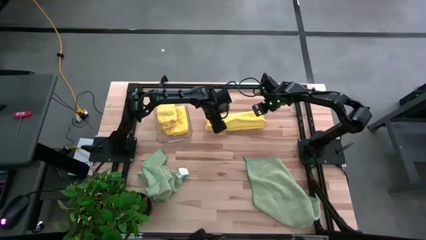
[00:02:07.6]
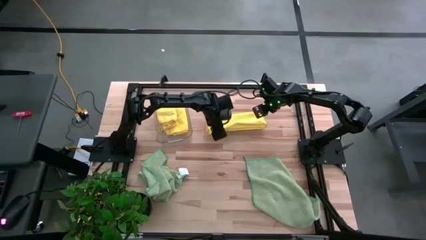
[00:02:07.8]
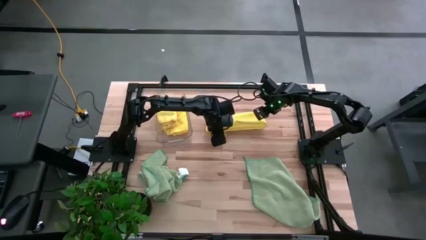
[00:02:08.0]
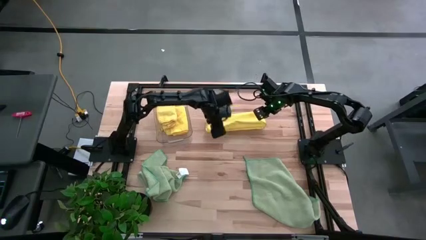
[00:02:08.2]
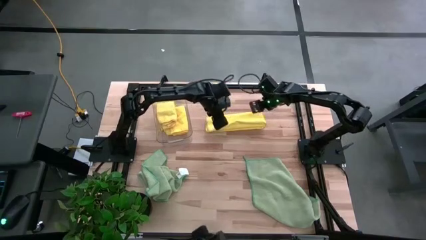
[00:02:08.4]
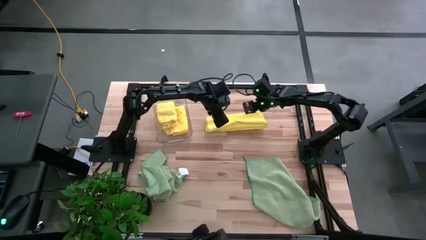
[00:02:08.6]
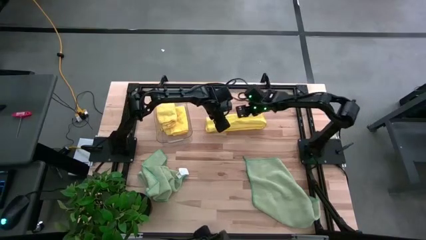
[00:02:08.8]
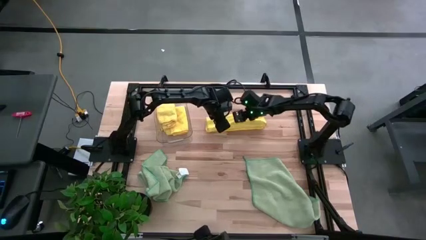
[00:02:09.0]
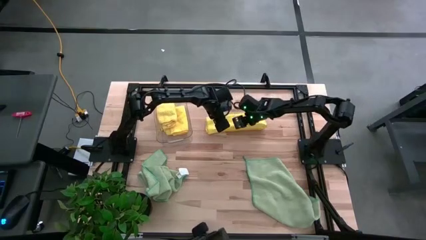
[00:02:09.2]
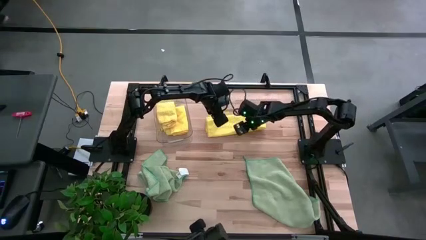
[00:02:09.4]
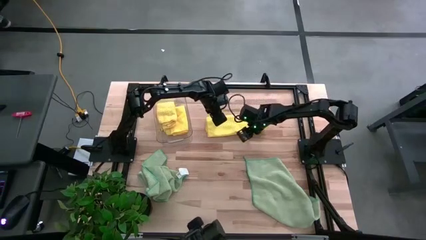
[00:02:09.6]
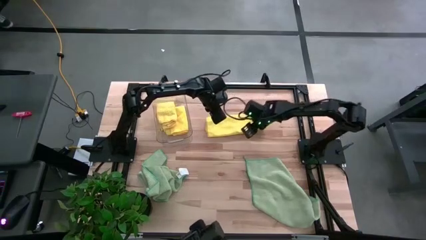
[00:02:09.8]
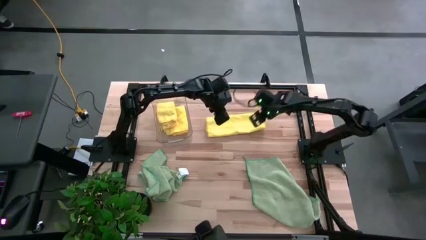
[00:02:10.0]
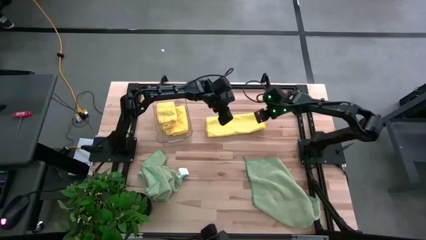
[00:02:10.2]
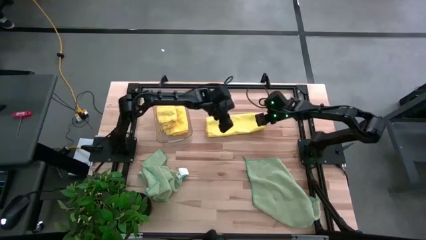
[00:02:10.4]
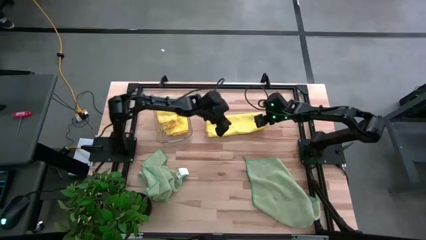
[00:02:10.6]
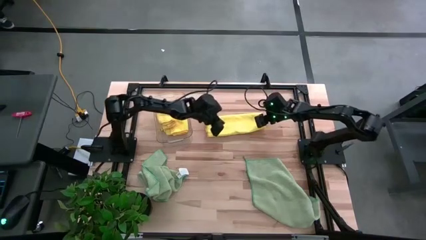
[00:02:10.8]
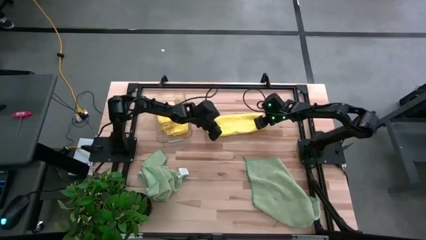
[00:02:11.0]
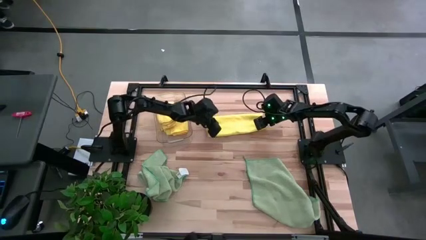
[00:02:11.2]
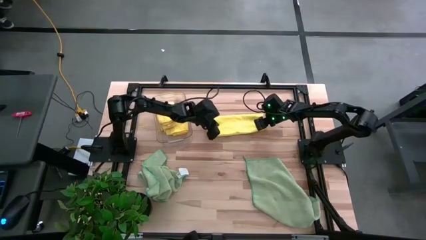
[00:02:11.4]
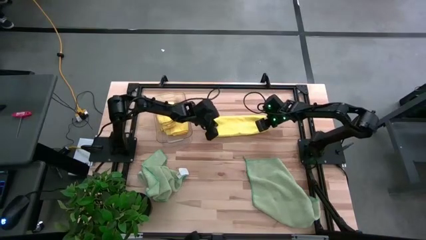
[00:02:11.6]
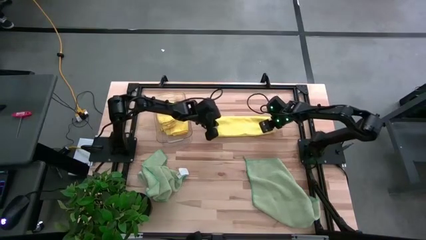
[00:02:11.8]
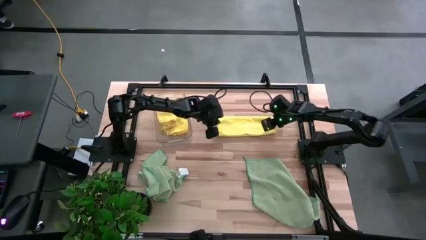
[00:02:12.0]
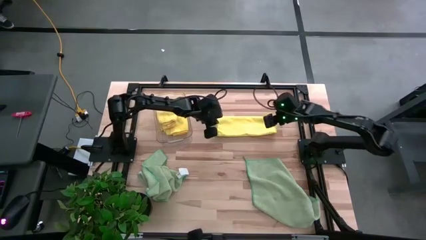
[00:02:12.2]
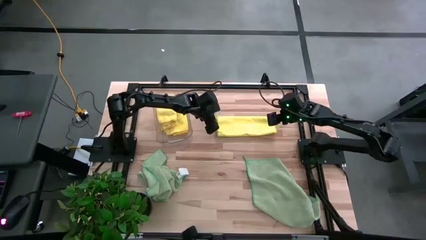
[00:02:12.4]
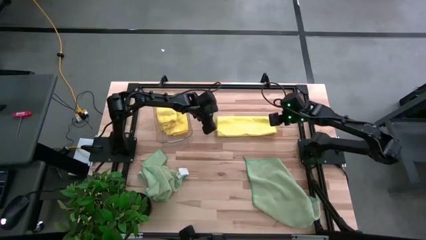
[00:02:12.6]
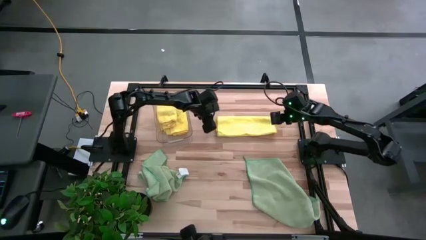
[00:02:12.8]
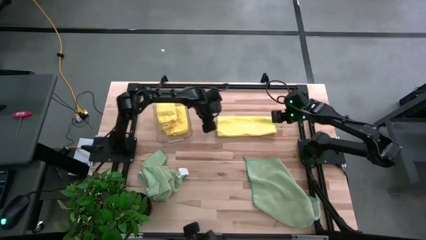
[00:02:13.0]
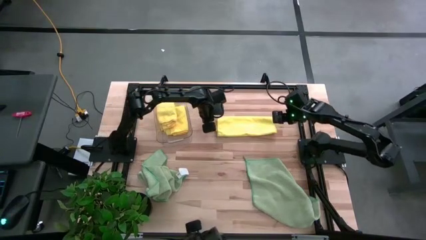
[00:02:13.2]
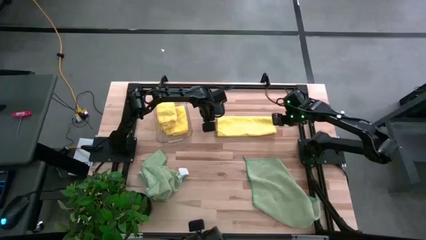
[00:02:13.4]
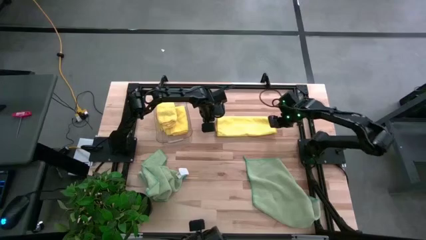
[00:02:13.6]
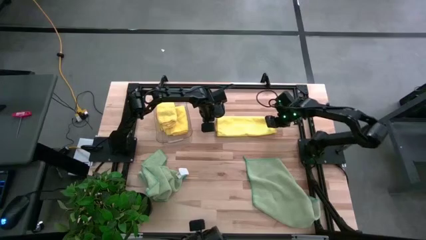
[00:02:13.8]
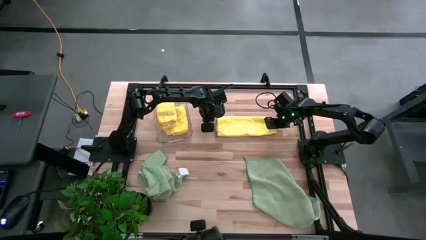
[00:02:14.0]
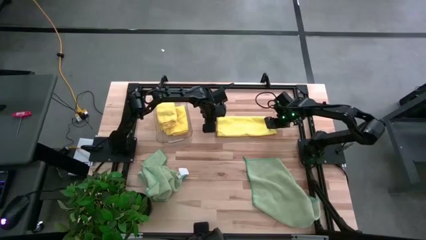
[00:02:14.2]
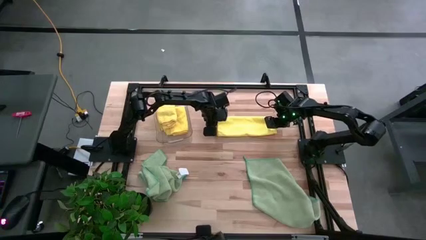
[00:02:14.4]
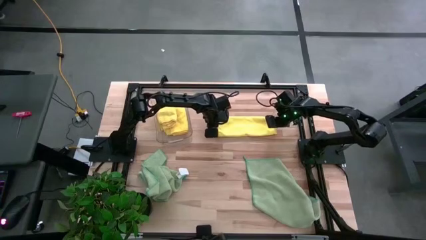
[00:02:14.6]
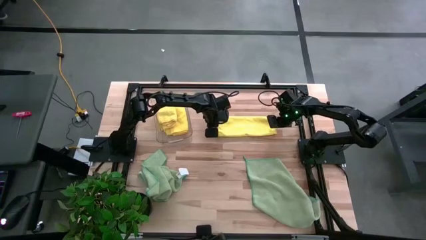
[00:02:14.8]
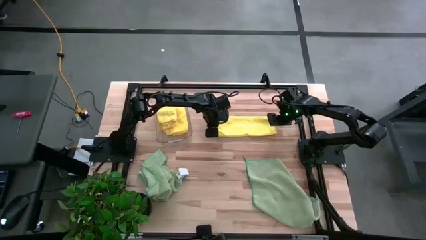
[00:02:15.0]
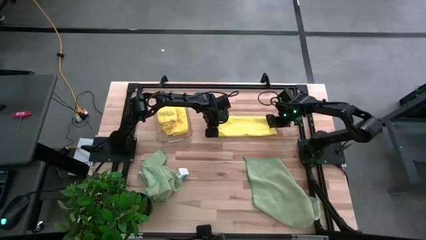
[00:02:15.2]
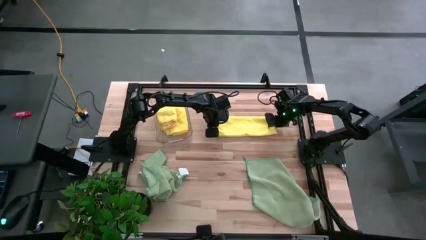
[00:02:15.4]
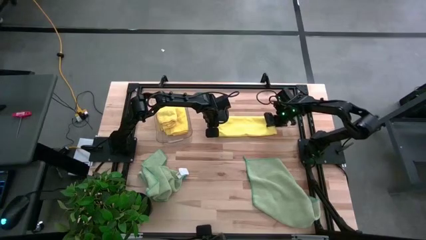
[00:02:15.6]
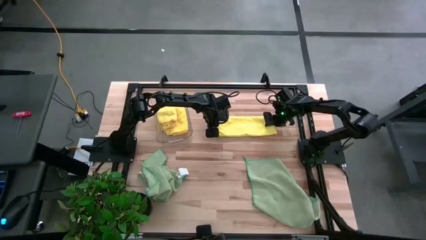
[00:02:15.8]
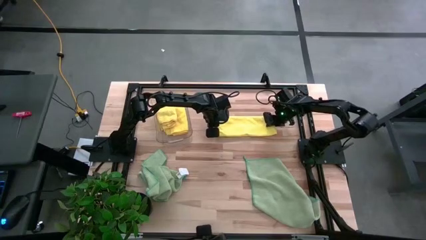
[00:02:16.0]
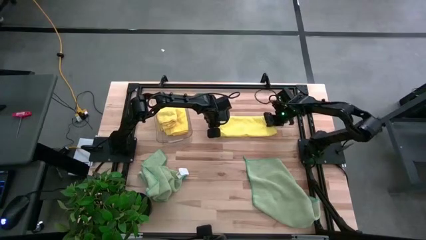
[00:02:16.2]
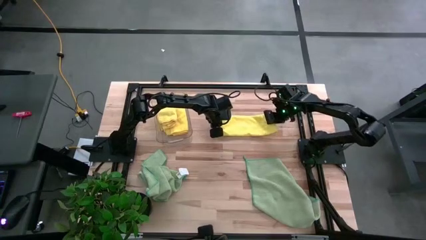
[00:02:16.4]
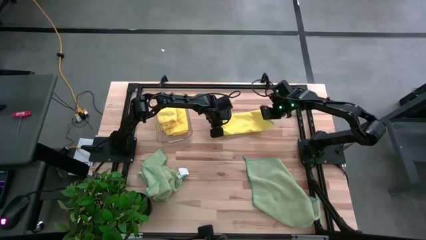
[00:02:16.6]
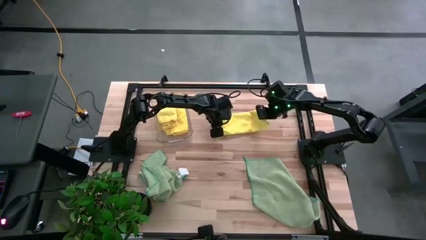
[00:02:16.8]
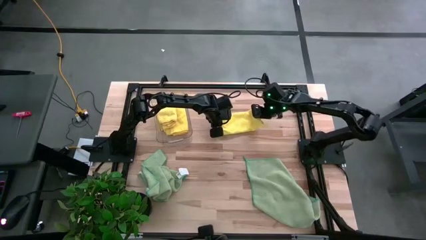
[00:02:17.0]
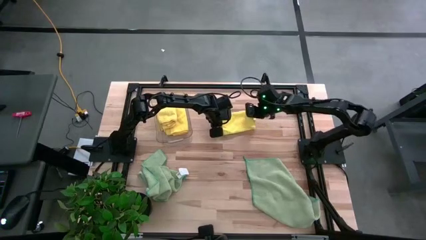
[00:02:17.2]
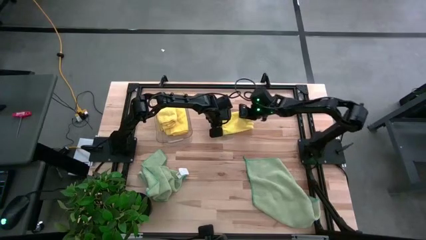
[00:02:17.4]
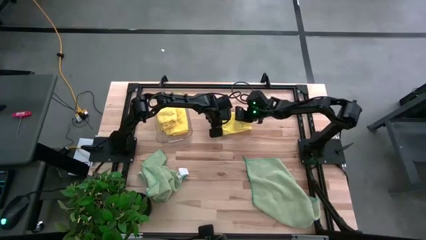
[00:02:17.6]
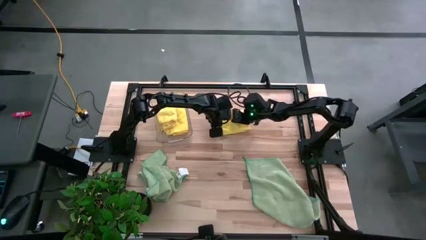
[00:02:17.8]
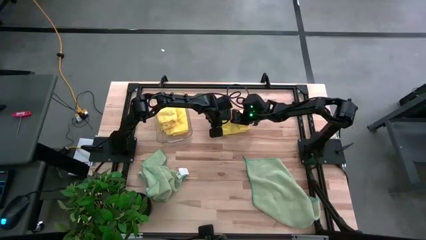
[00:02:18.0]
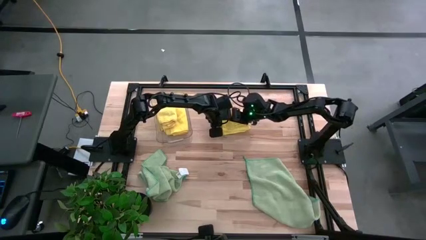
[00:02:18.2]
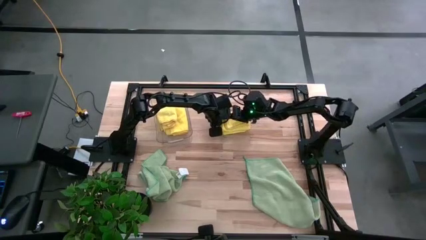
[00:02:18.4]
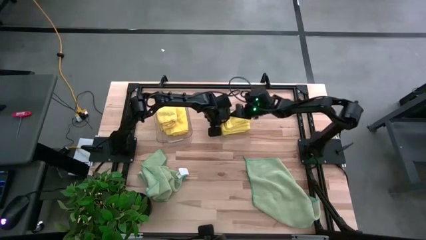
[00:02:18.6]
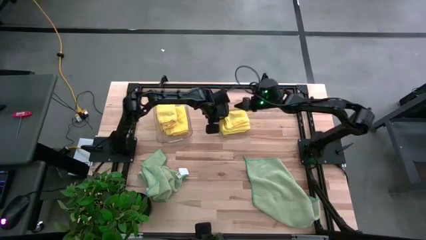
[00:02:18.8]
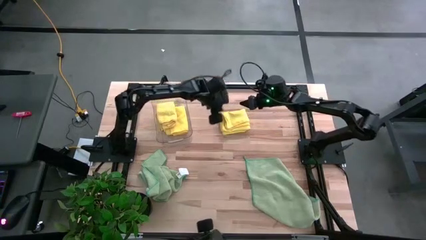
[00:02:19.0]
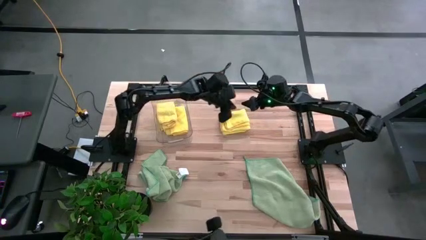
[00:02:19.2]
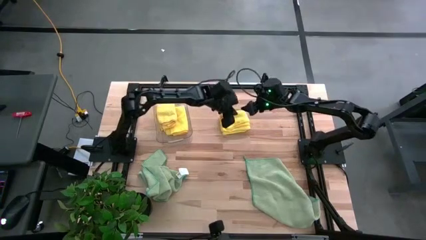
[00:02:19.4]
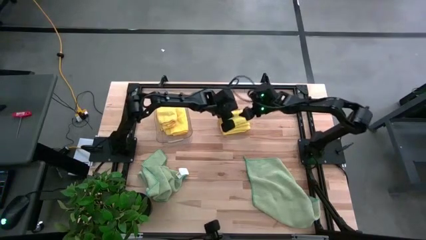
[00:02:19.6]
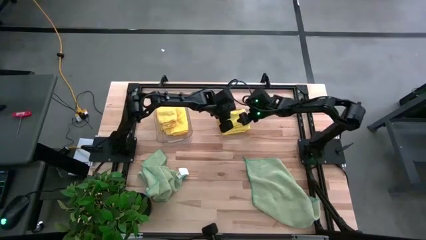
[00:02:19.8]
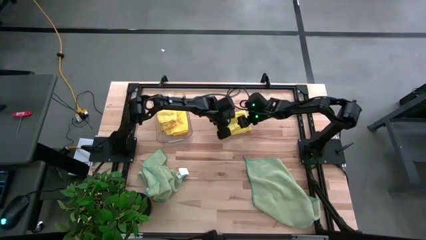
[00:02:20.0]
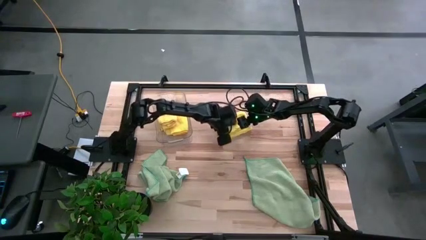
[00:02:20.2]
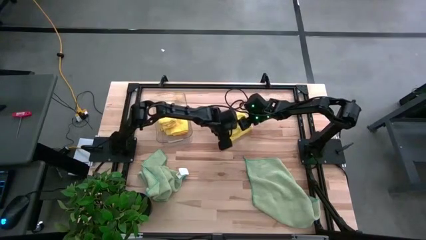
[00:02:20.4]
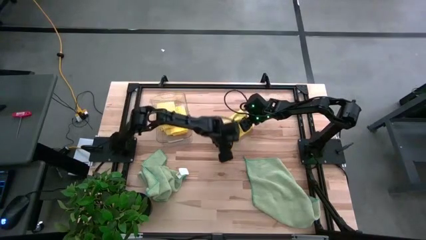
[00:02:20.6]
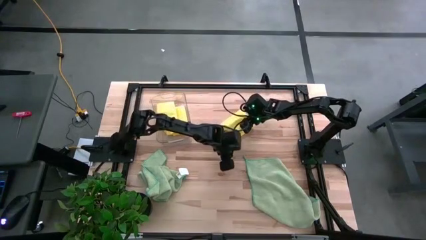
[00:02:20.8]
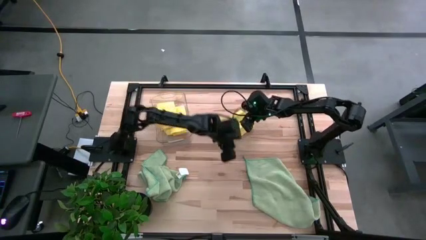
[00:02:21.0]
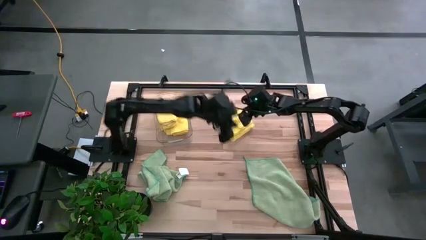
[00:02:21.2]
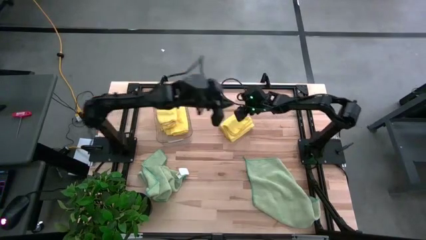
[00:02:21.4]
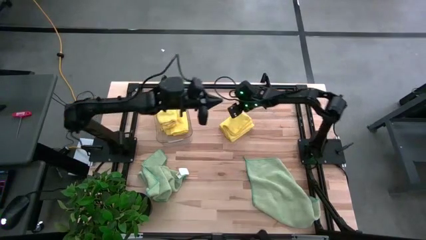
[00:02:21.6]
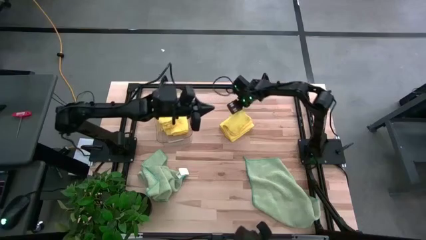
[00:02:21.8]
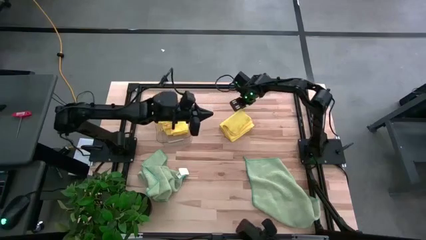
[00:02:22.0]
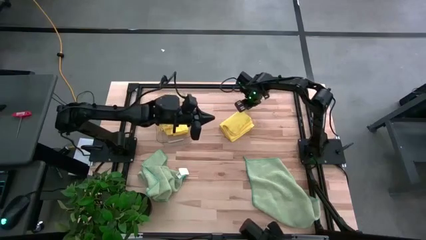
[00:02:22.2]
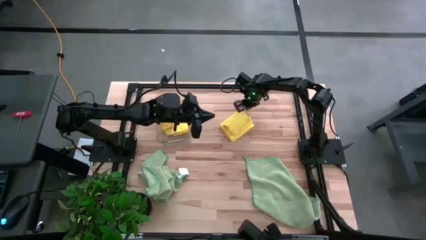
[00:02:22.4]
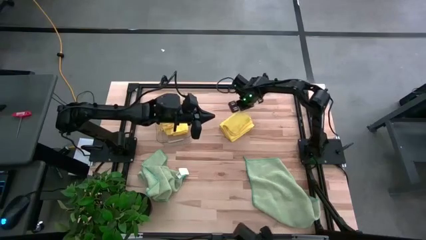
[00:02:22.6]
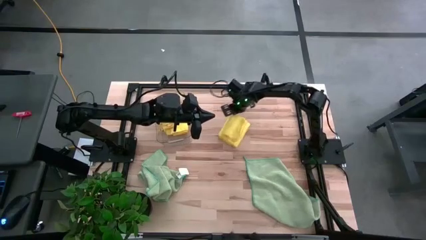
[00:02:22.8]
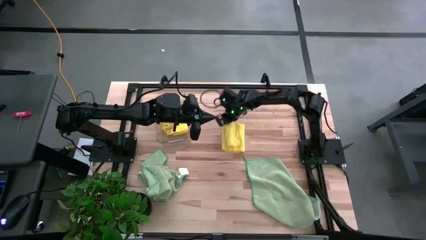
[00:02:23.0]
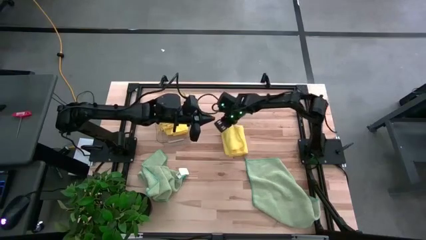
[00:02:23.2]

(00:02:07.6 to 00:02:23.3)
Task: Fold microfiber towels
Fold the yellow towel
